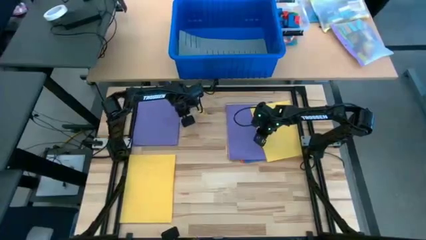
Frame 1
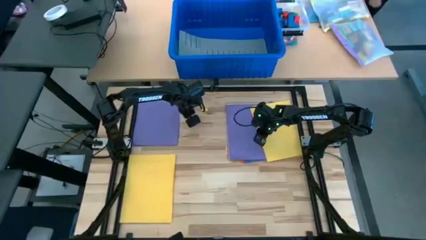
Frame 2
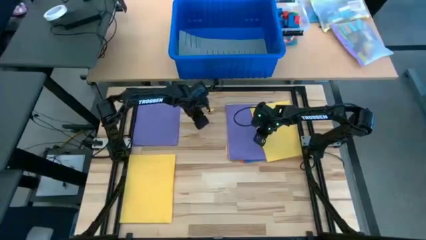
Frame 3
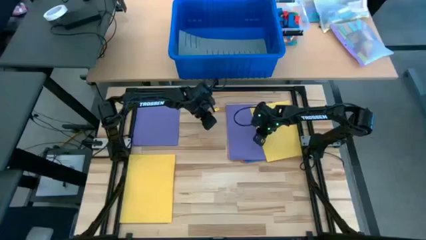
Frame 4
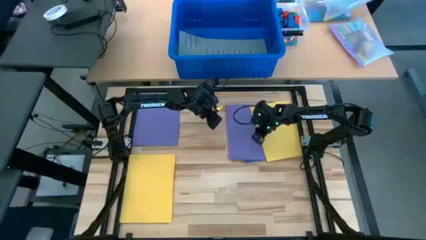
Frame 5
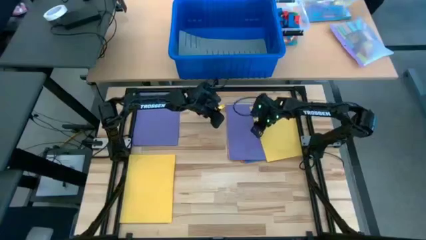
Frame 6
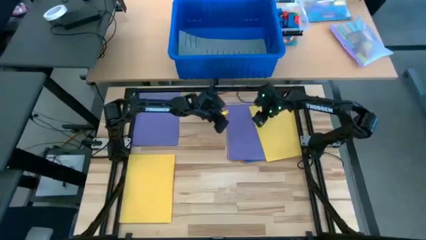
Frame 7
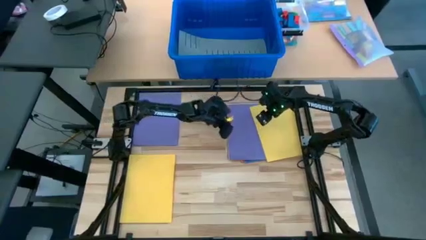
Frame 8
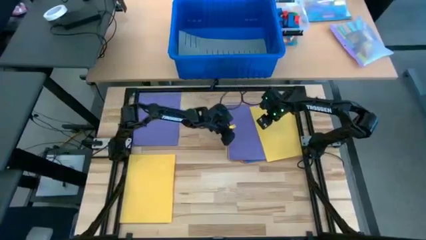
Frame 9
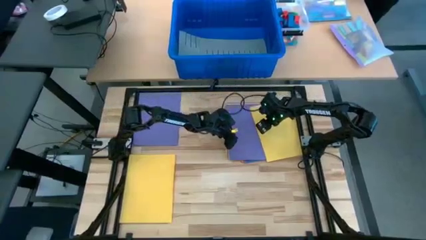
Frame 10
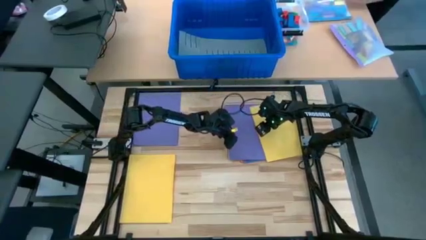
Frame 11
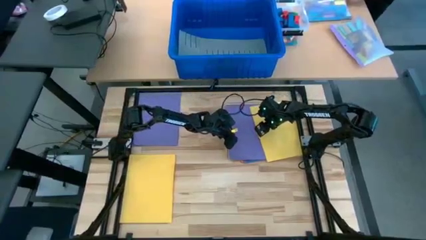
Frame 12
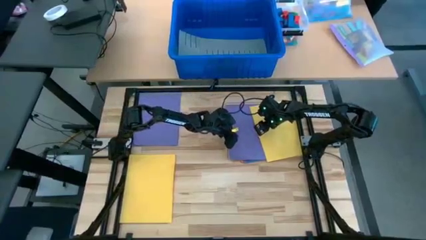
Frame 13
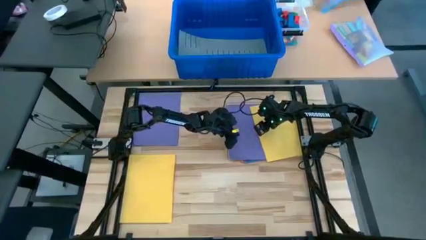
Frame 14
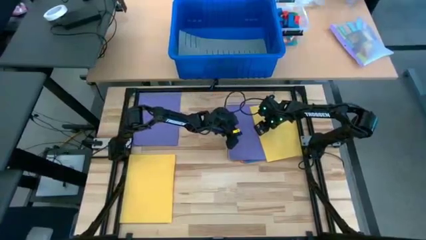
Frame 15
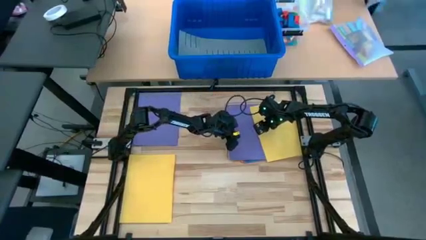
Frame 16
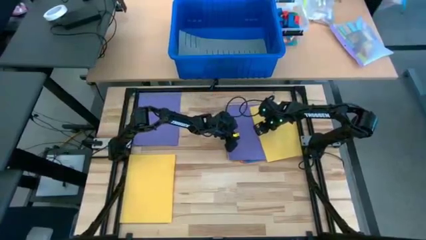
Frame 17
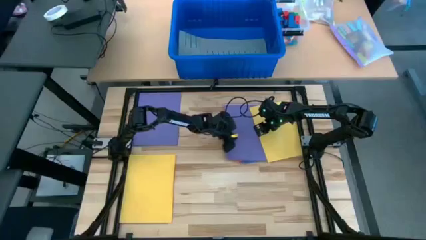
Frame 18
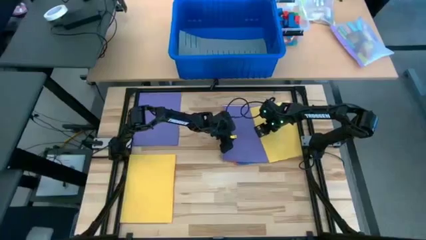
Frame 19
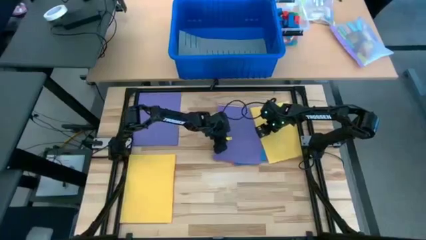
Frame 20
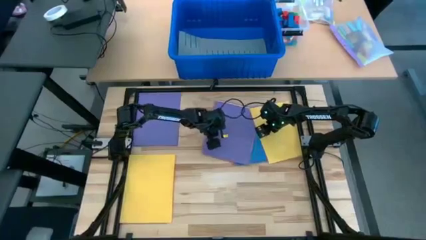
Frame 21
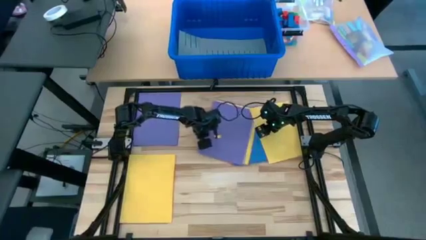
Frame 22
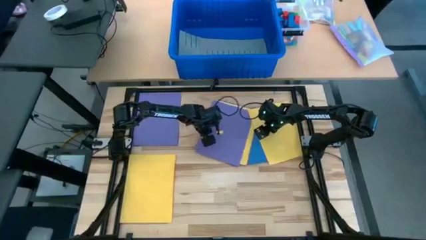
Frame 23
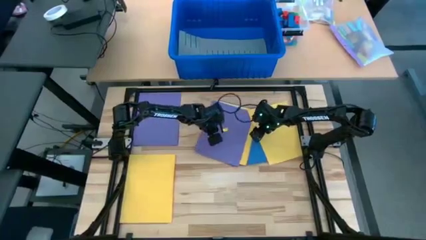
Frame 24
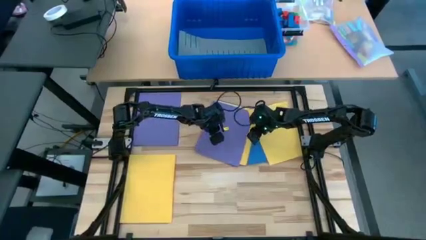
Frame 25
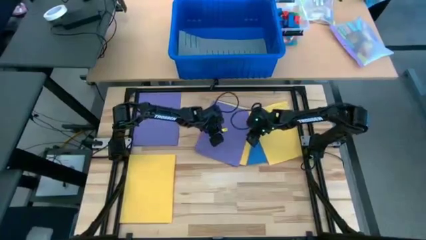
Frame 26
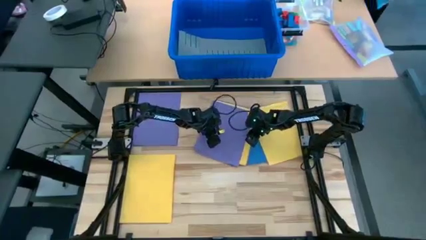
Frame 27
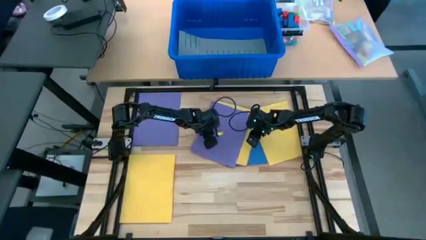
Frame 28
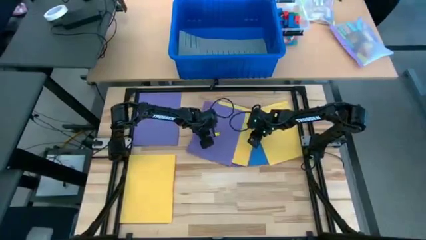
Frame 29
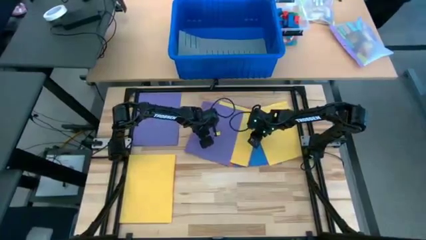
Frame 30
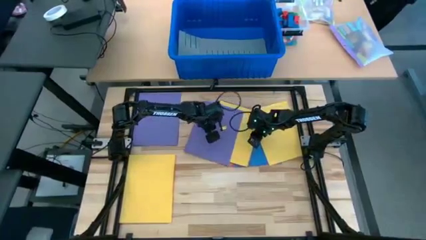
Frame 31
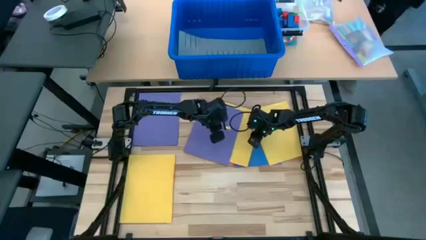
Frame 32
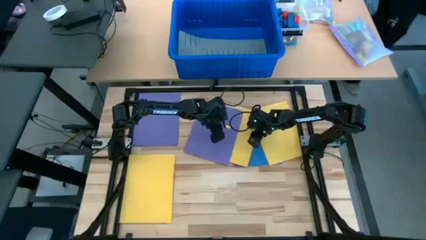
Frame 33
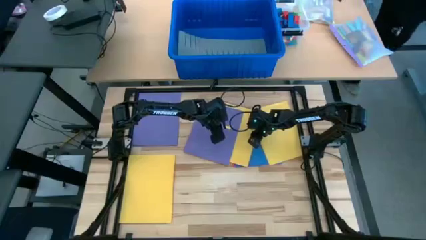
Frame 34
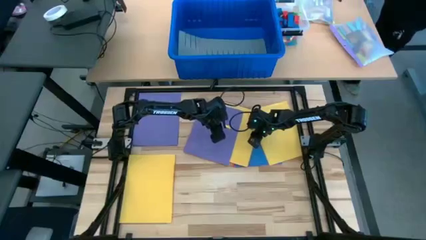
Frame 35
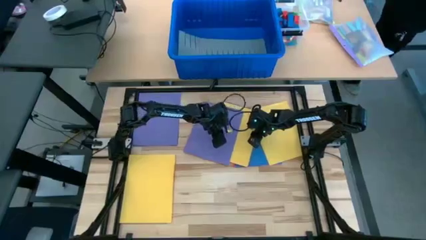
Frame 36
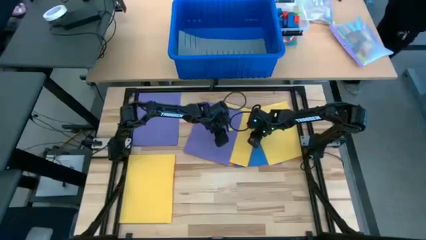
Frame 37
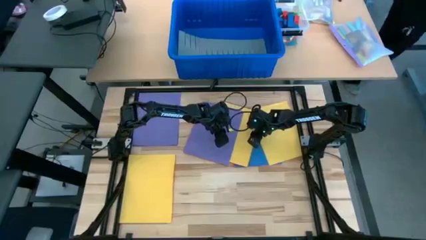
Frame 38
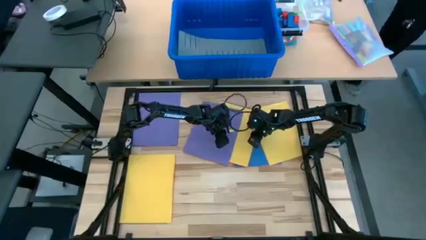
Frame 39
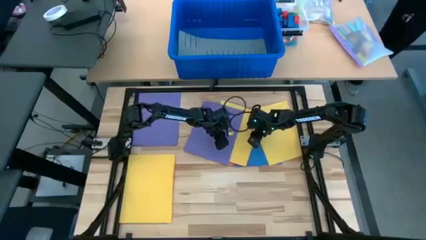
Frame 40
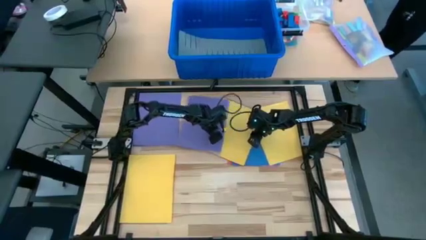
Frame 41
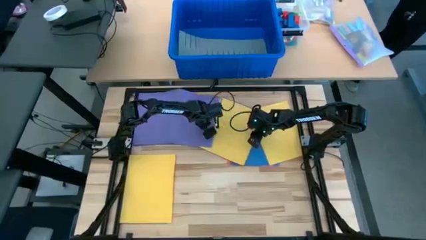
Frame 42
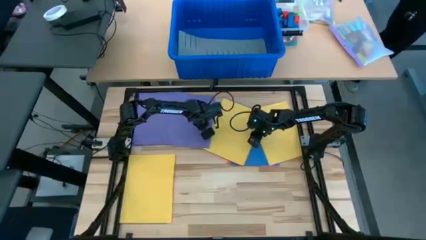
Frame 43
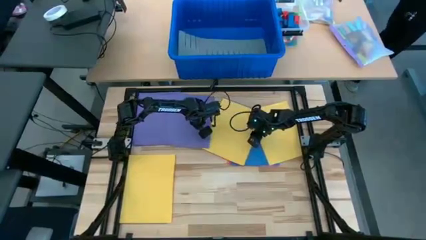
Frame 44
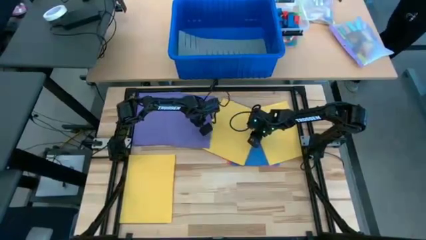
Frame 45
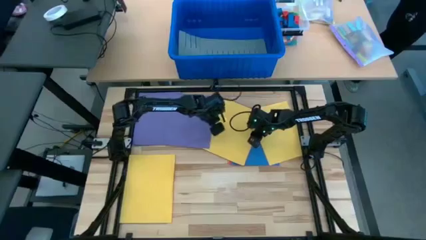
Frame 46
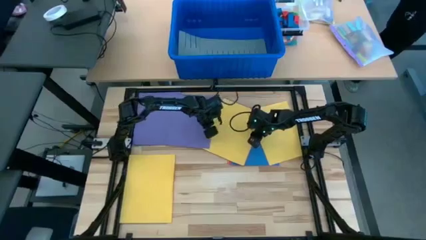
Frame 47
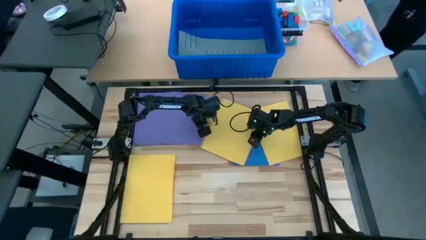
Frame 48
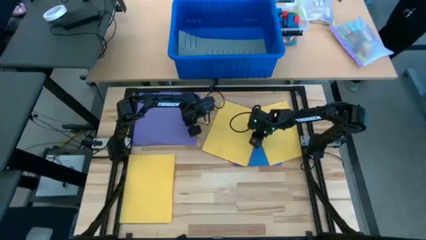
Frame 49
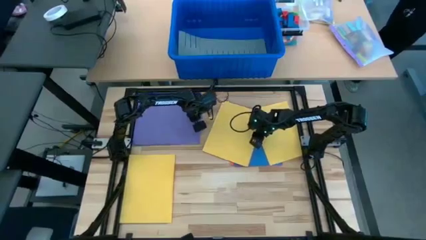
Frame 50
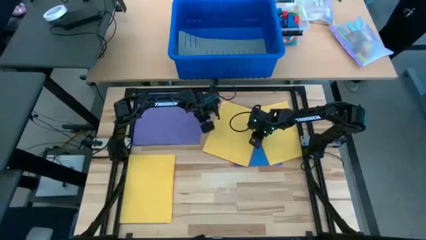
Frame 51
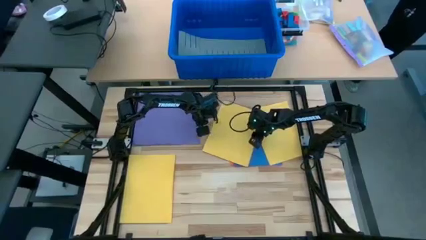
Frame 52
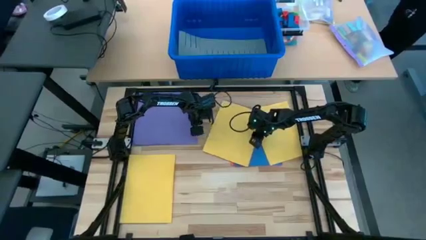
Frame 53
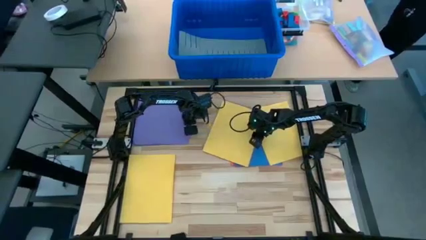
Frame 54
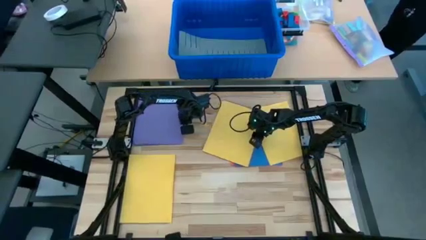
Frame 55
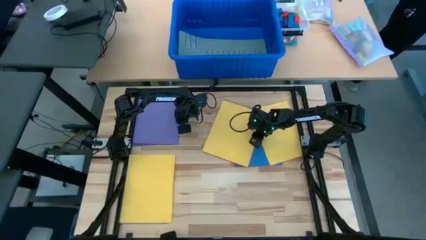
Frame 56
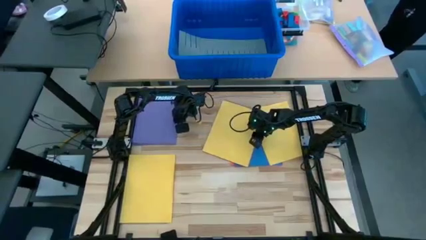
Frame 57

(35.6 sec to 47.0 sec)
Task: Organize paper
Stack the purple colored paper on top of the other purple colored papers

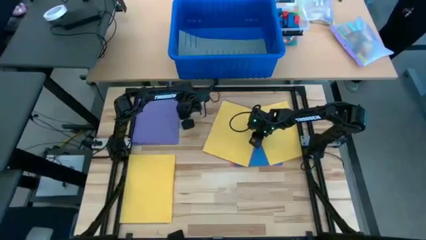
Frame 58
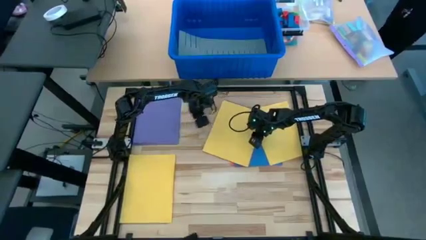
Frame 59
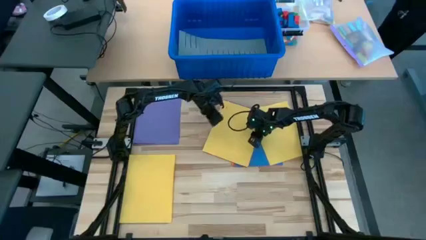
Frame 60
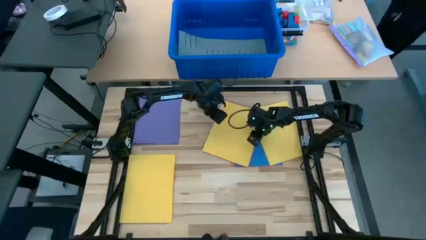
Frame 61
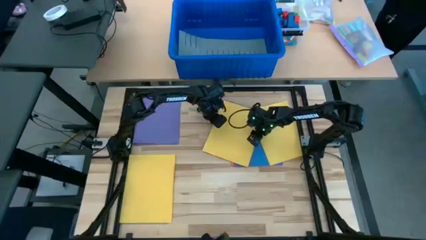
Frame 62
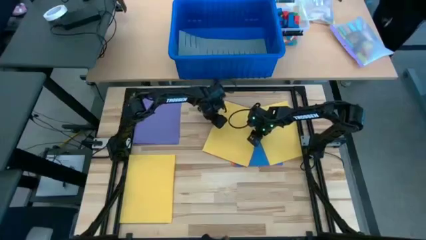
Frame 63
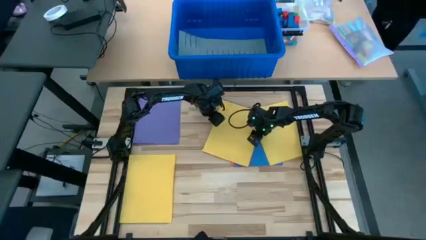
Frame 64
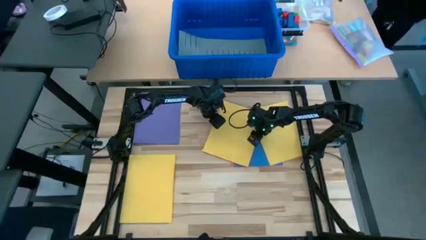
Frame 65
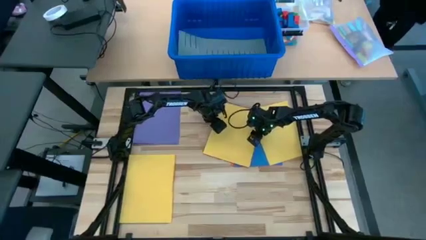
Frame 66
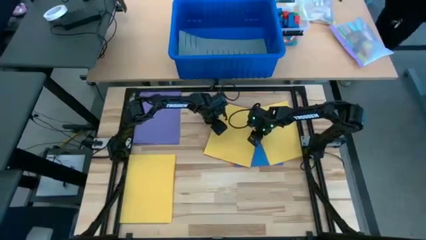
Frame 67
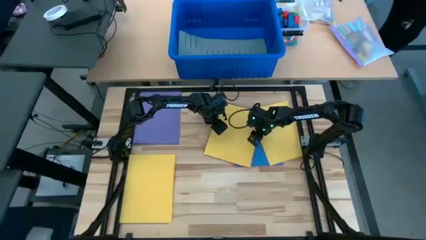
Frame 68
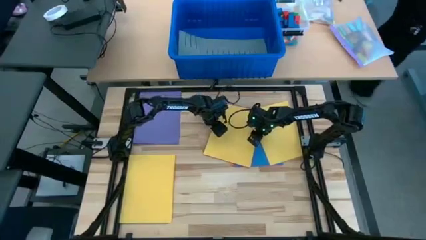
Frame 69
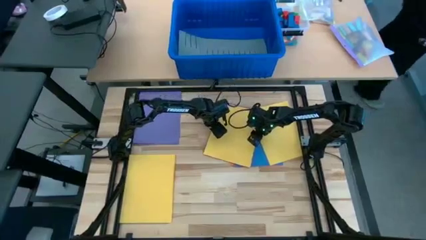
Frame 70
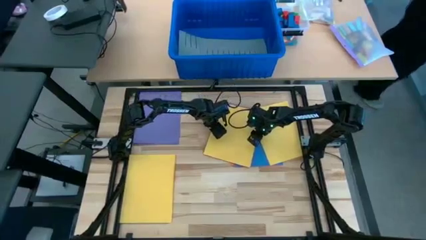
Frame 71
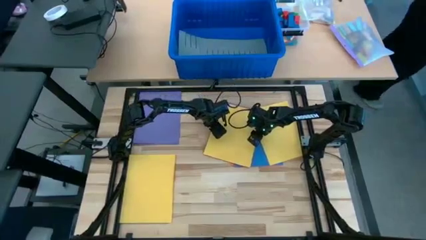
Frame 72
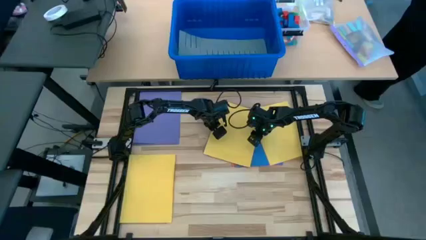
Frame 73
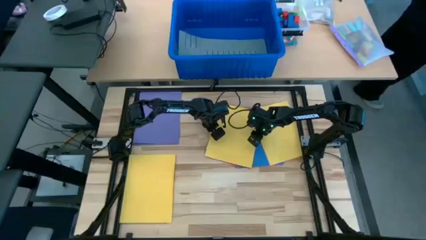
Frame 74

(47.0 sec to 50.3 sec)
Stack the yellow colored paper on top of the other yellow colored paper

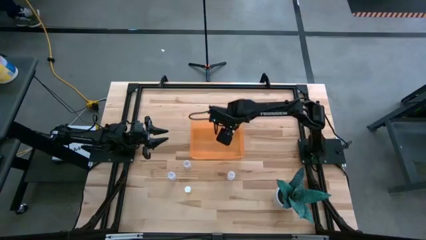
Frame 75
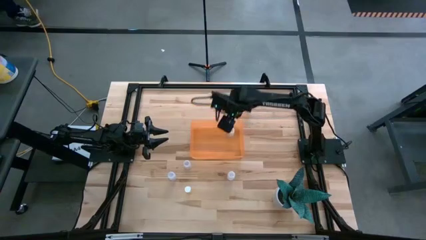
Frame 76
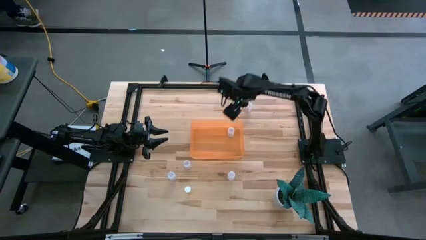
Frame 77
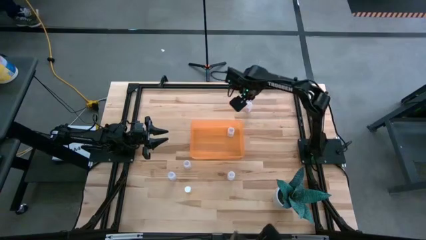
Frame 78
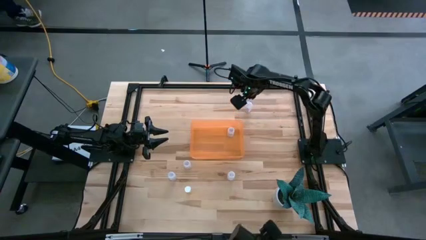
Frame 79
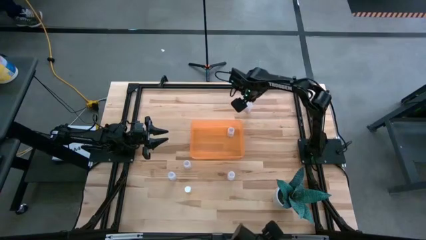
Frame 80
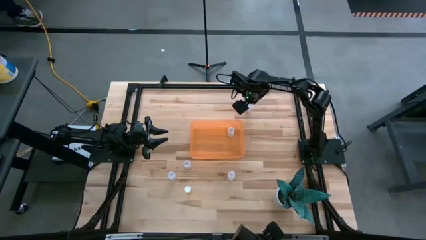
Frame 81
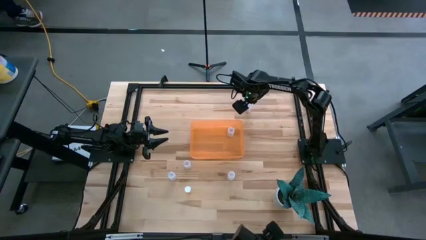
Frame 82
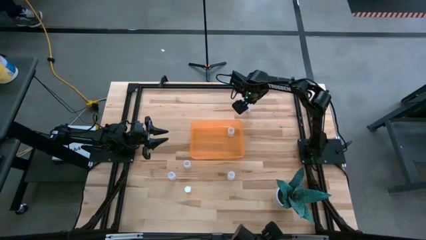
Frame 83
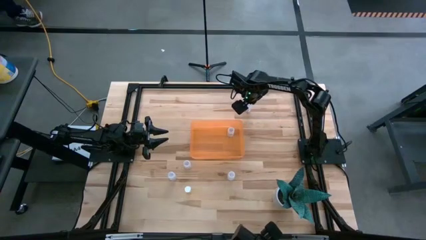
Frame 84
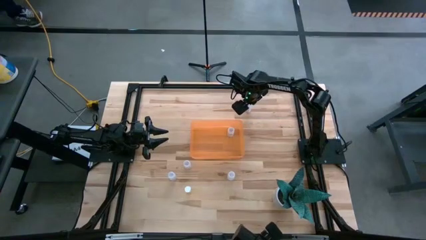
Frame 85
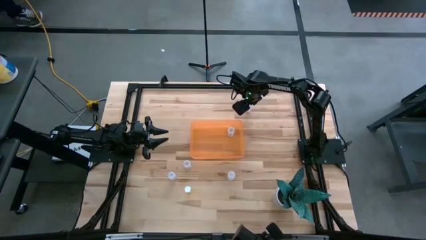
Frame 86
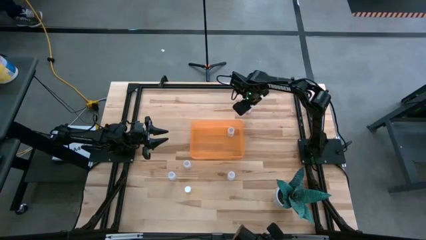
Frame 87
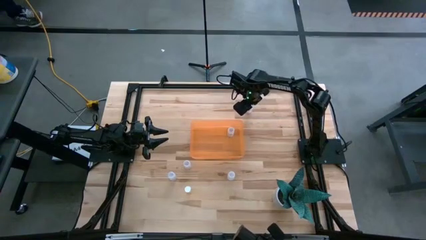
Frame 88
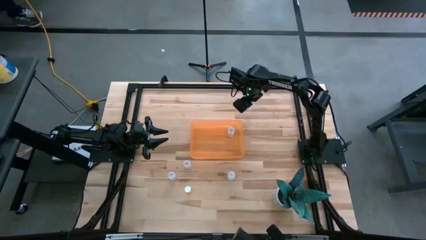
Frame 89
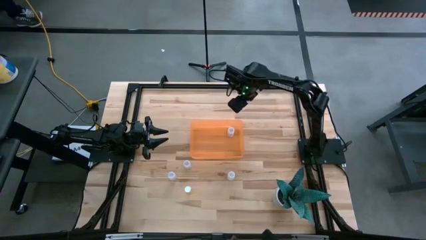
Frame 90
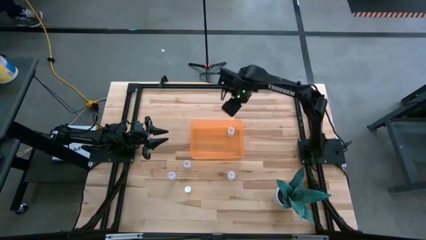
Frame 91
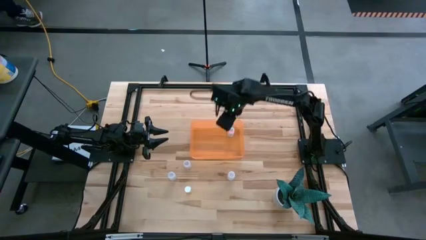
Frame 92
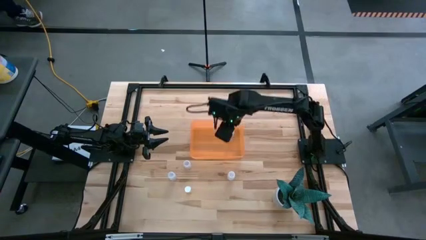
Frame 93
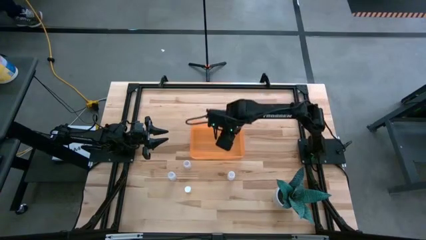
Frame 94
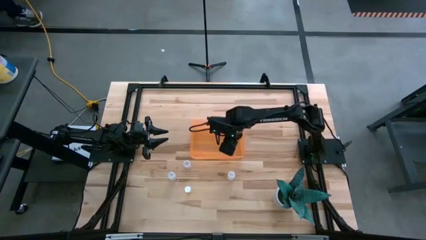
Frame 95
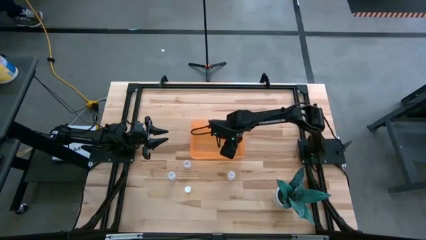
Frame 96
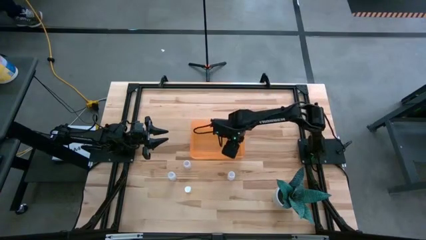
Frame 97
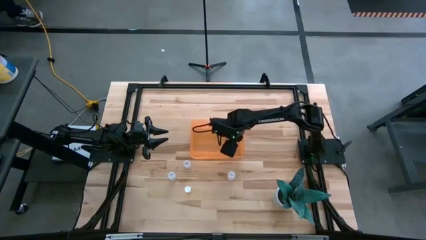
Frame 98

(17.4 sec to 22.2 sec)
Task: Pick and place pill bottles into a basket
Put the transparent pill bottle in the orange bin
